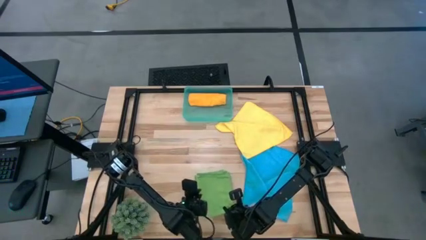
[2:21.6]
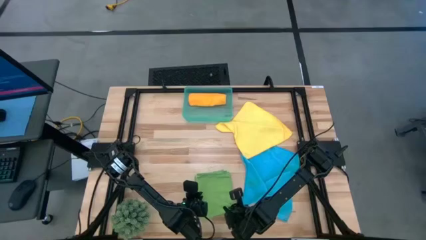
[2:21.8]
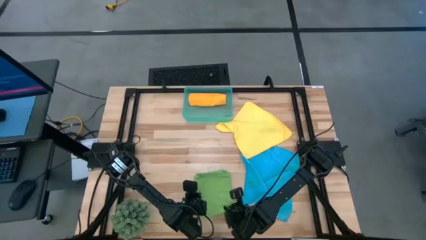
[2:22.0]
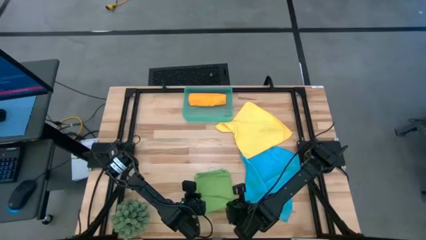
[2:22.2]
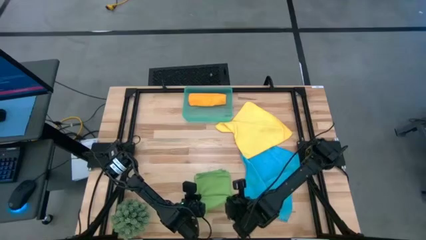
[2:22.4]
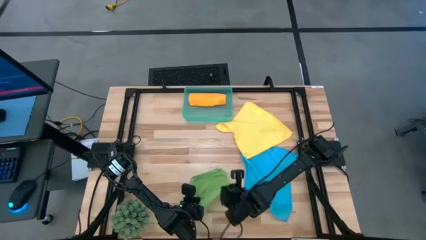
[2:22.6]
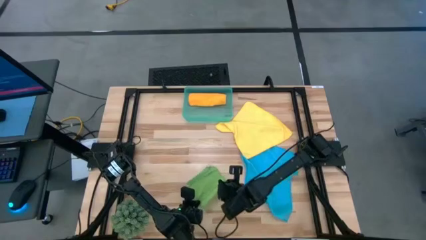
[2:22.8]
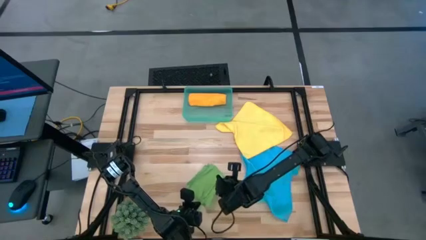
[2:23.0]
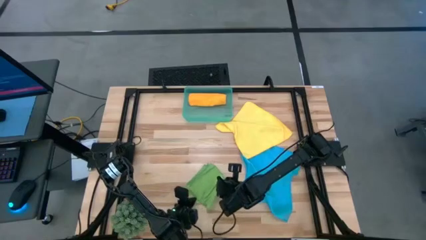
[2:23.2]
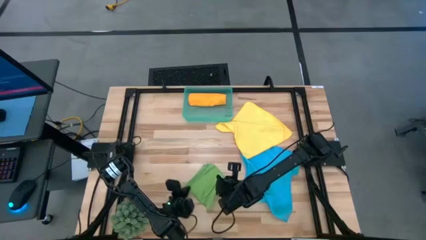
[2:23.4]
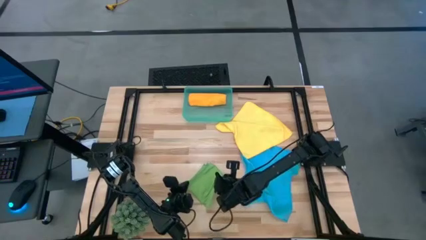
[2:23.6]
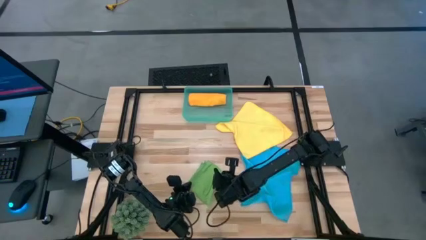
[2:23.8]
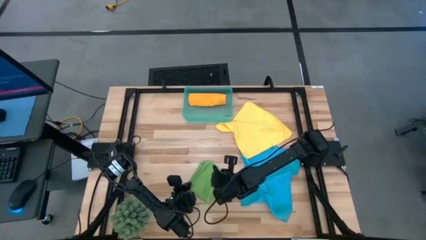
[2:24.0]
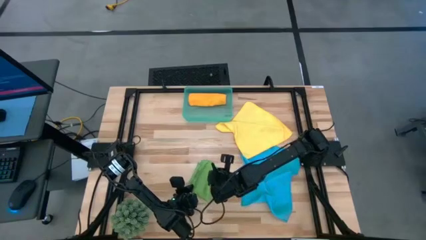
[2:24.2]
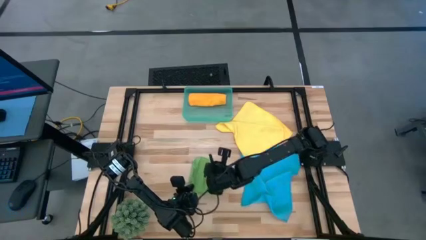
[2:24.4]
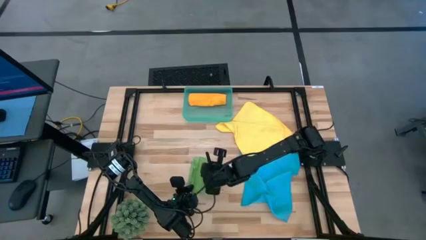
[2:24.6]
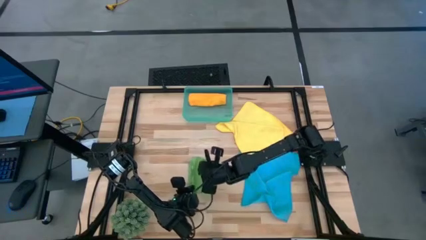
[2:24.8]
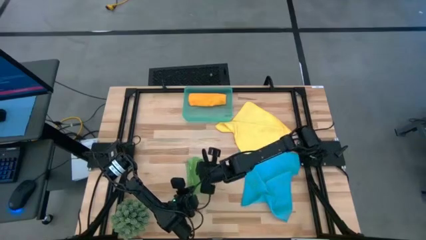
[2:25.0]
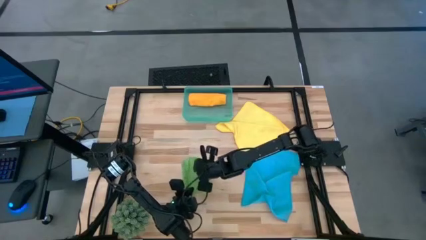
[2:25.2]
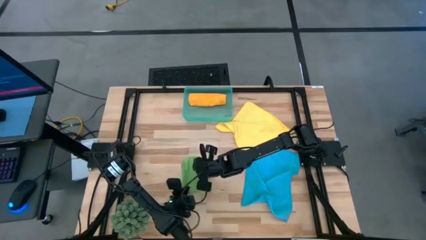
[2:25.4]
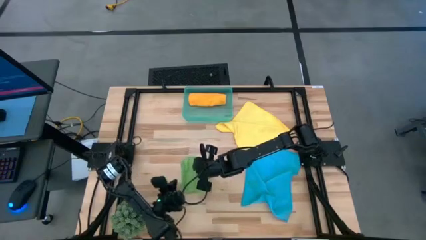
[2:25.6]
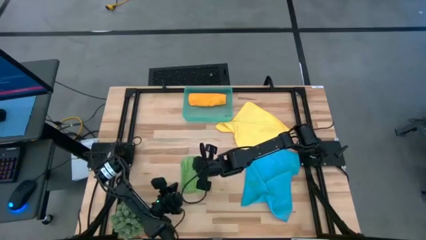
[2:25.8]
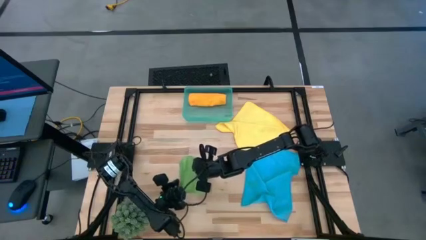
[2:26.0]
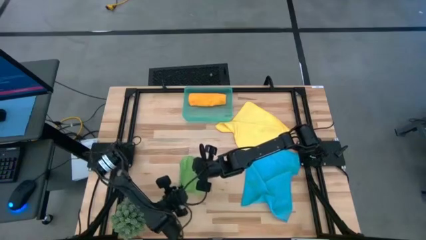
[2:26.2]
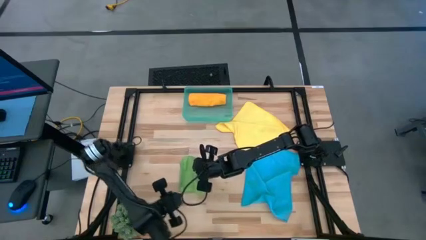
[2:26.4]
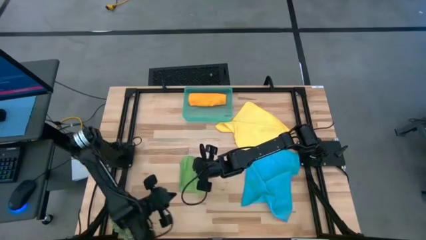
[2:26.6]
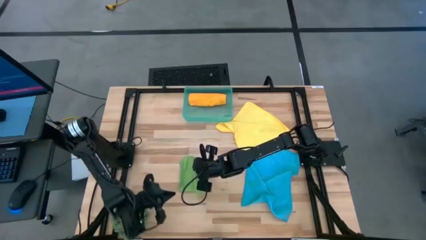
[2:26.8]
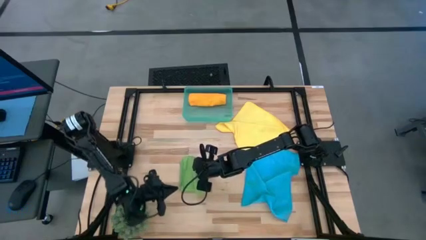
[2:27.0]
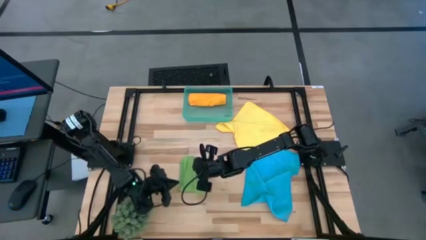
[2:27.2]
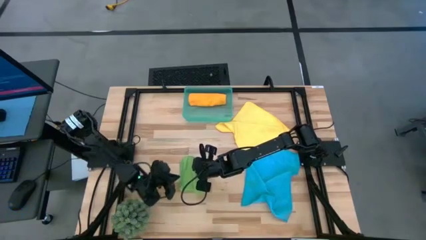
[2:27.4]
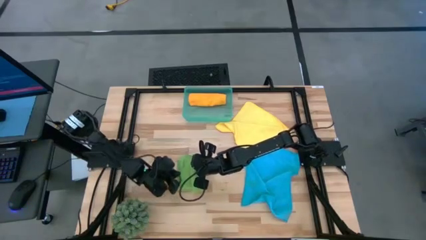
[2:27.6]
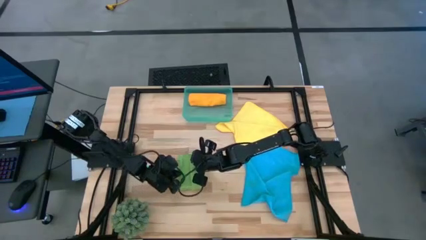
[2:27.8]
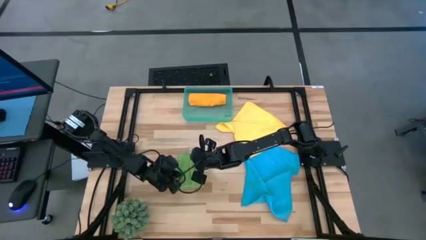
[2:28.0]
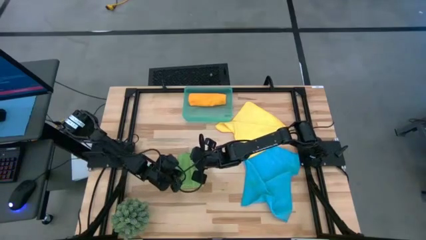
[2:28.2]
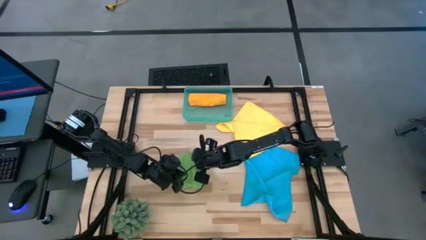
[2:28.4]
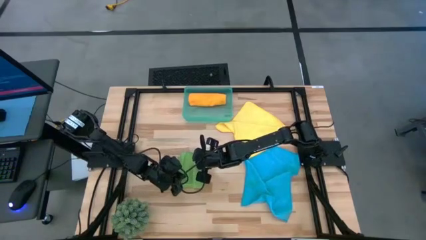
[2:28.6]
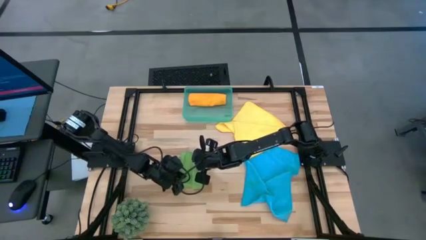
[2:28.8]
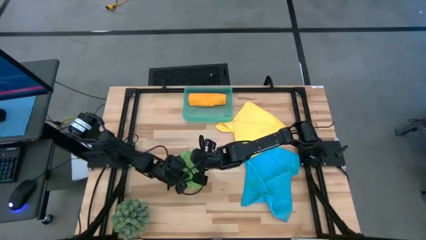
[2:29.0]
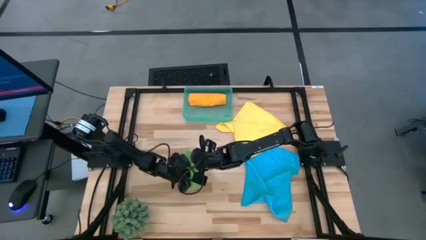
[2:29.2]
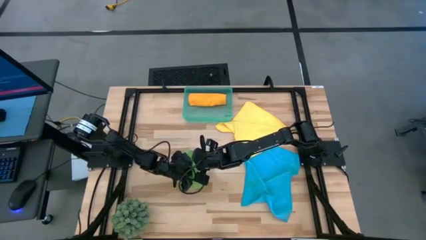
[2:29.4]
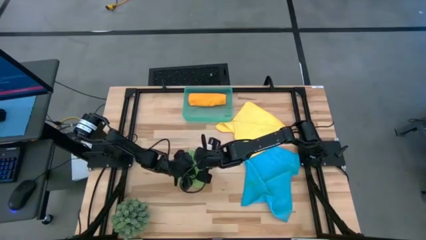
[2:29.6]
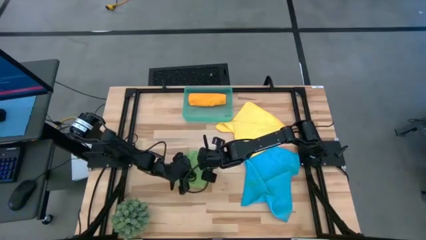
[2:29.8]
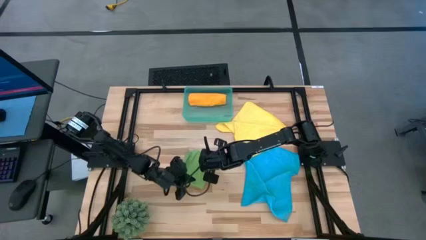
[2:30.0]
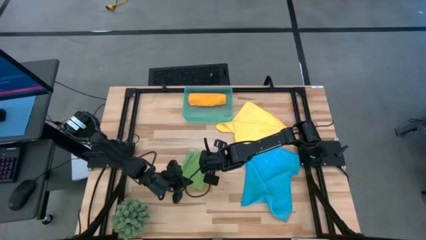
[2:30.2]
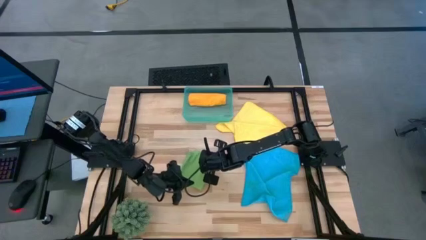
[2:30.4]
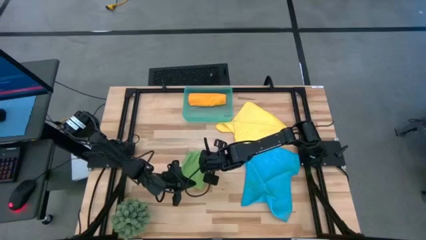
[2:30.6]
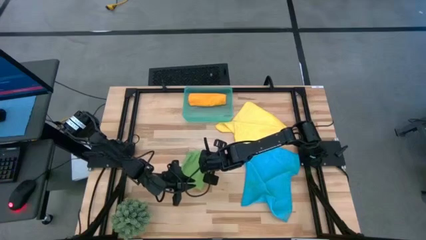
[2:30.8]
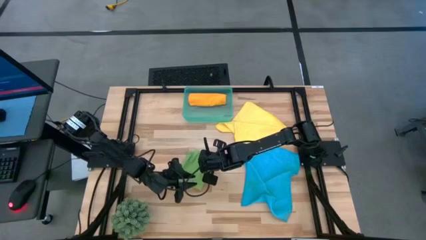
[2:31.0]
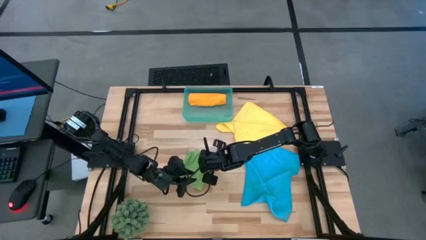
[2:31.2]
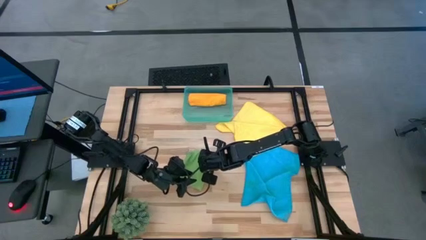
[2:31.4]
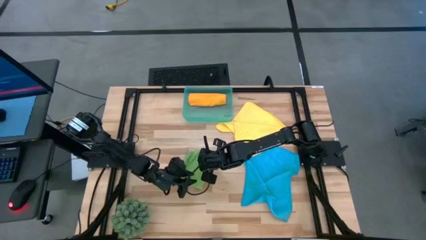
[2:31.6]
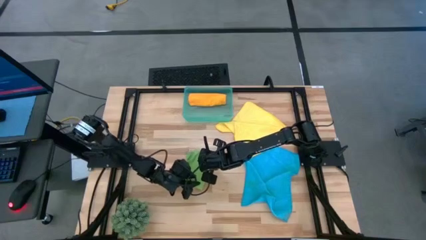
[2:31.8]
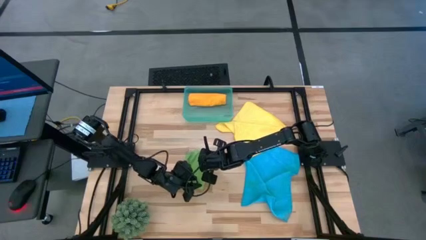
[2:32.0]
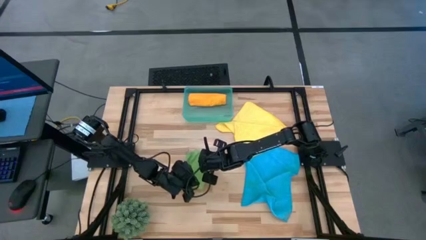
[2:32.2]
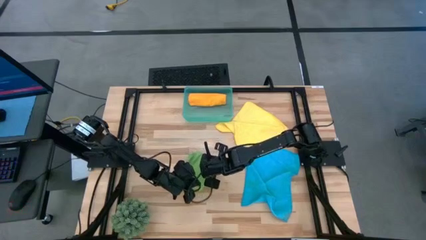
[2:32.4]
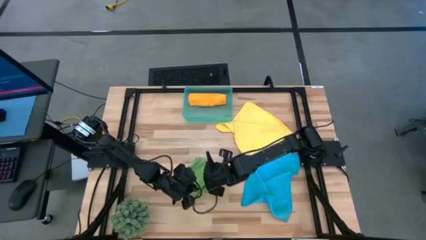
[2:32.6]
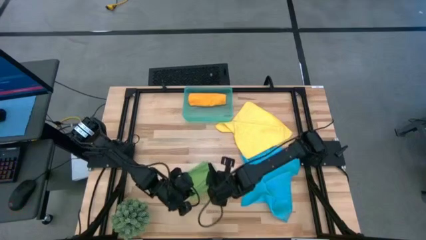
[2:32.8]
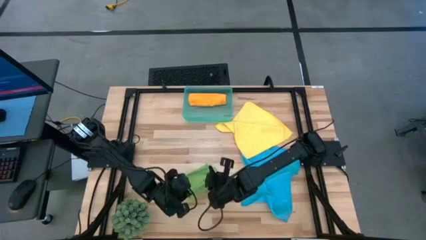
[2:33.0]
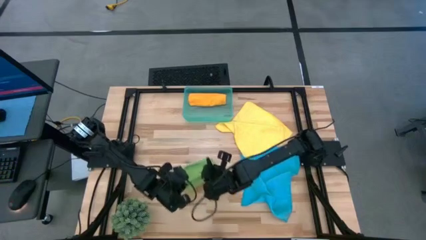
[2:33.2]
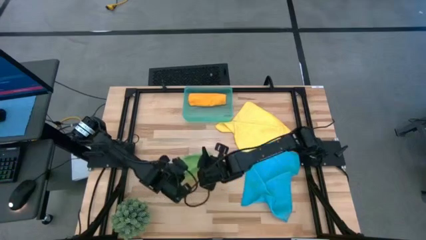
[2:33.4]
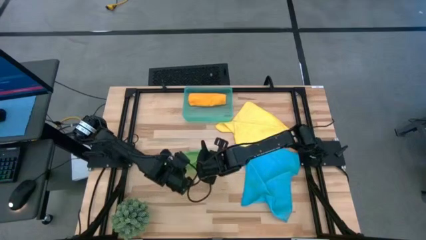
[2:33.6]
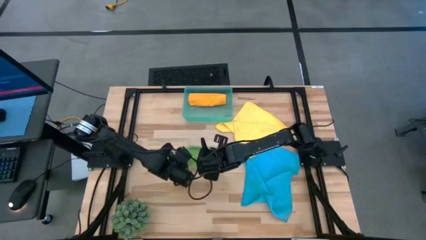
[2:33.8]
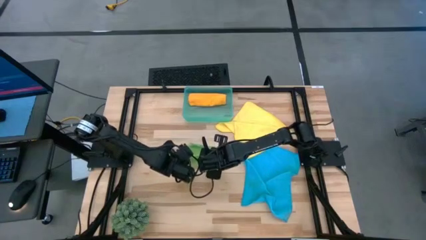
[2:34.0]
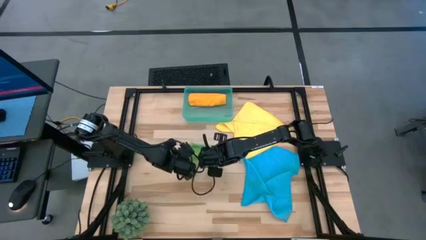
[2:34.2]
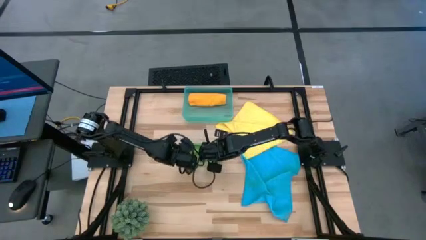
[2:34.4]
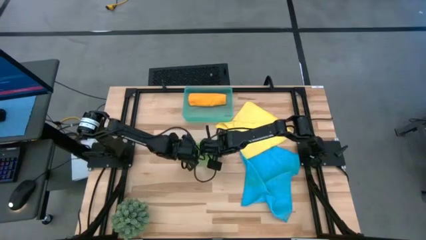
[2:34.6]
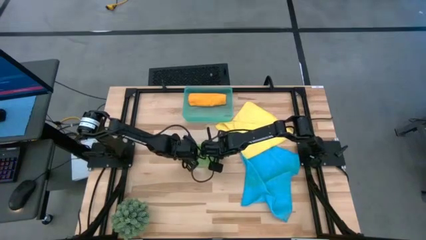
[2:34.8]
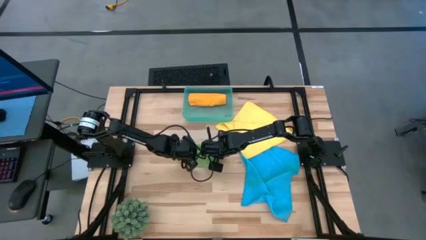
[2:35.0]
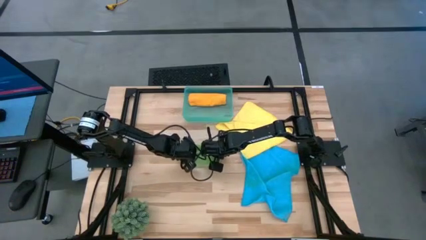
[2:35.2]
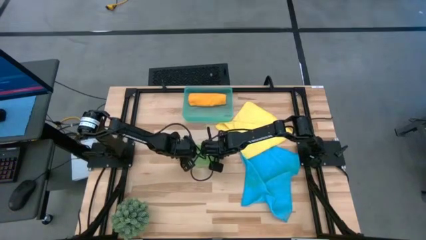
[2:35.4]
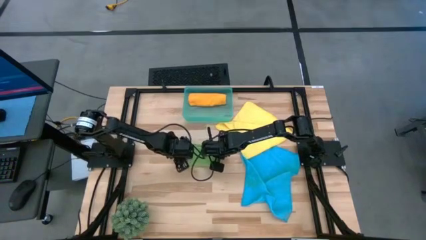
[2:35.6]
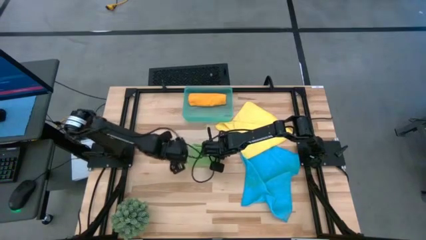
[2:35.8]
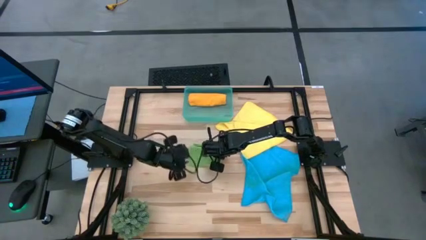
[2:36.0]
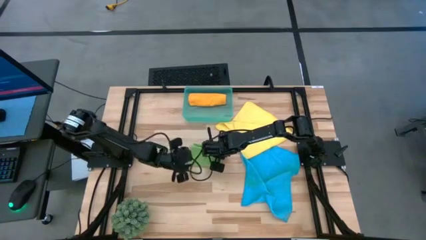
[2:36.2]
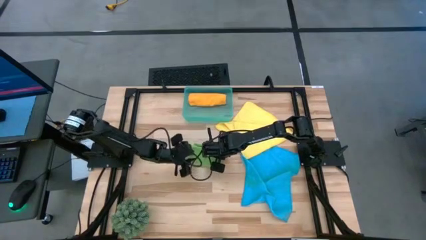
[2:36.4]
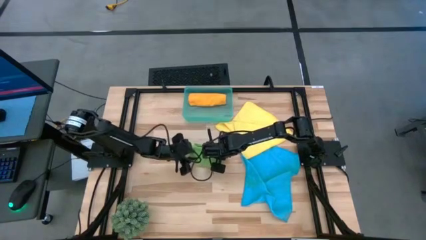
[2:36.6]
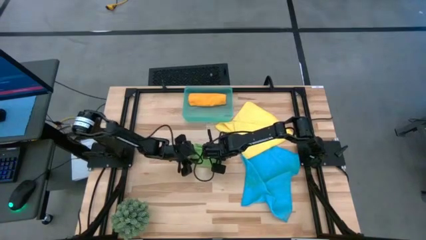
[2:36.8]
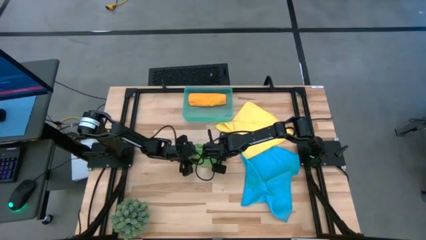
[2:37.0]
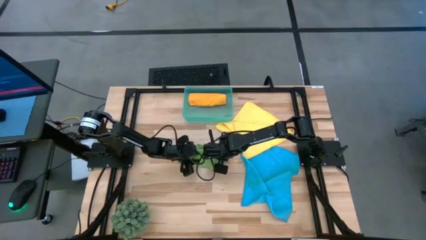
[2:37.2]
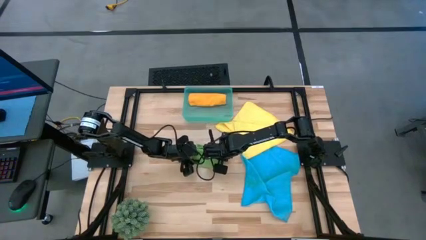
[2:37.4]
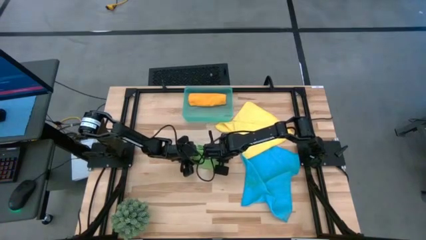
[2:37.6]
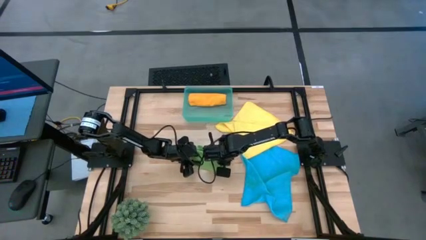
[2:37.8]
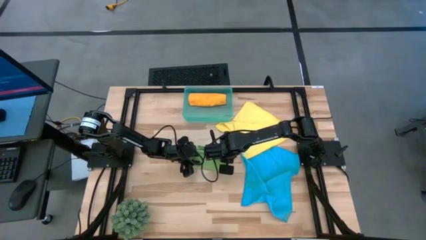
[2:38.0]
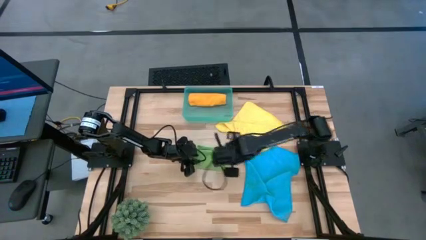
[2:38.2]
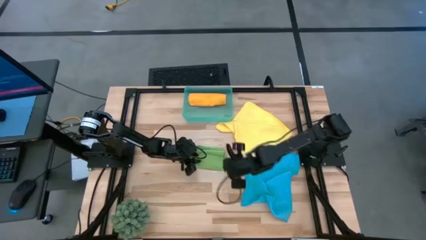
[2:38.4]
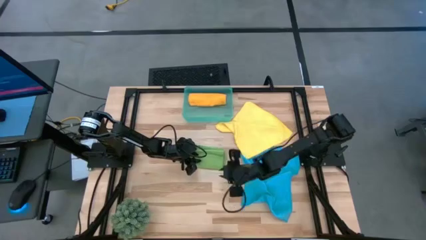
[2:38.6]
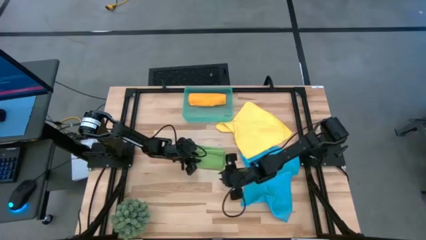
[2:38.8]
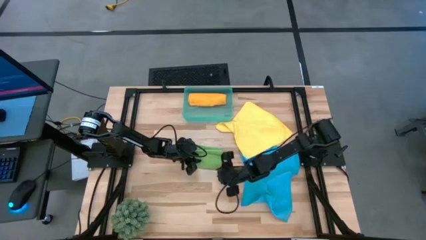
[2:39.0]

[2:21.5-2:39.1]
Task: Roll microfiber towels into tight, uniform cylinder then place into a basket
Fold the green towel
